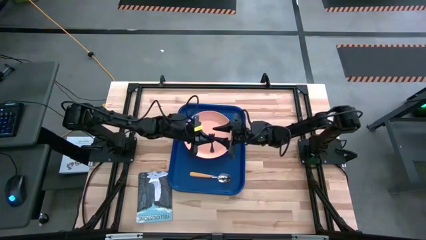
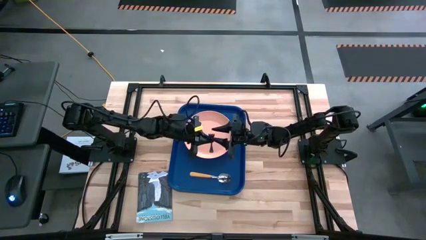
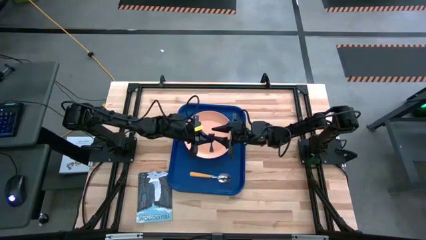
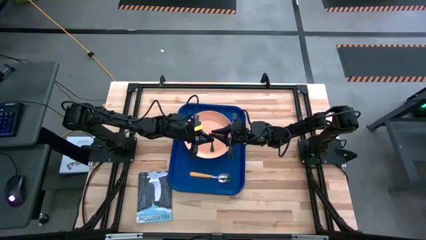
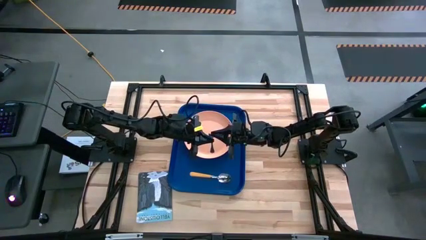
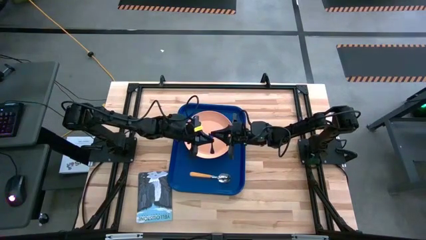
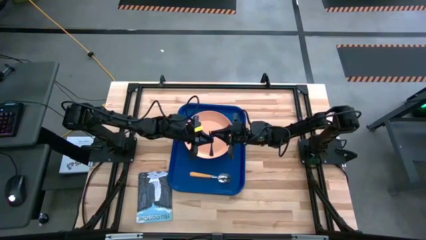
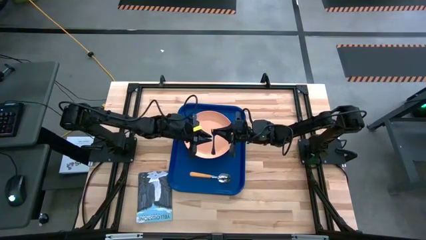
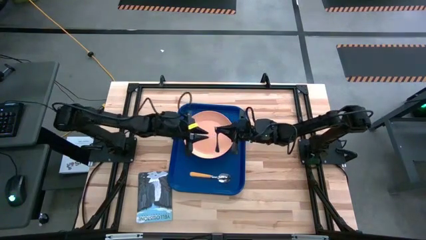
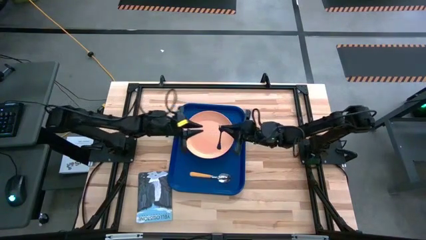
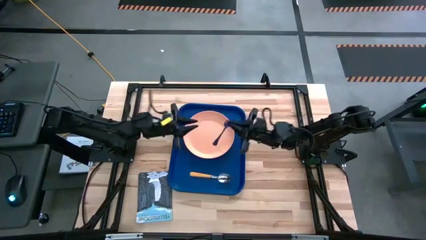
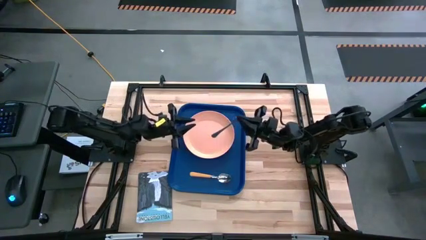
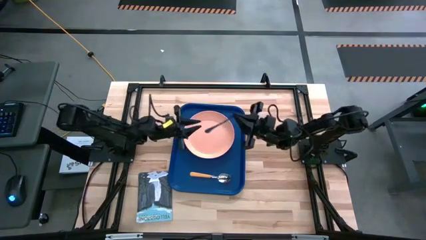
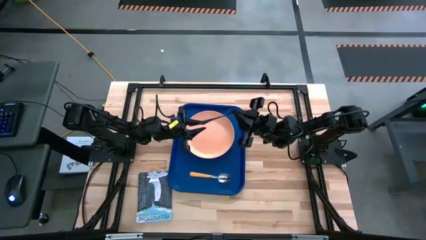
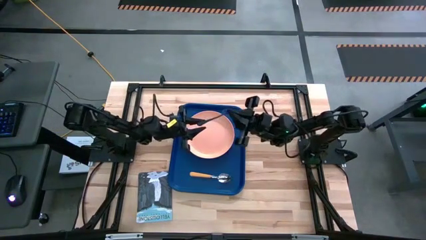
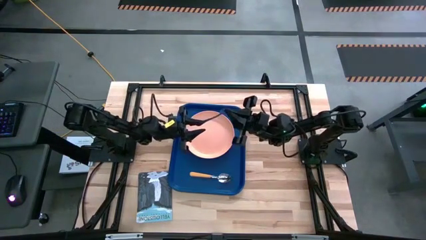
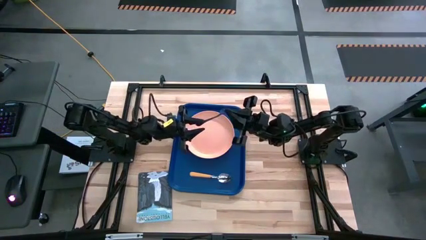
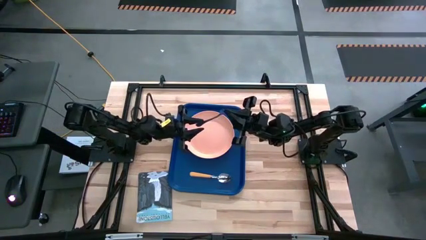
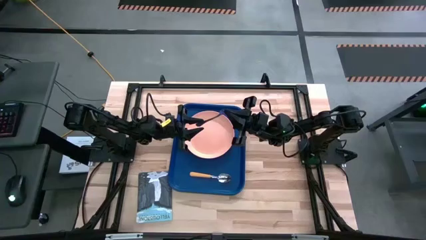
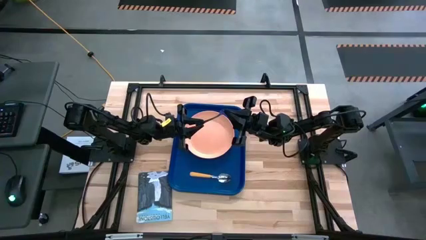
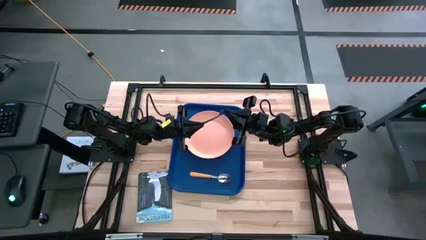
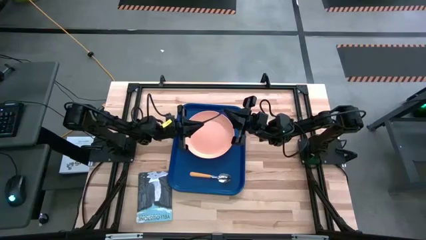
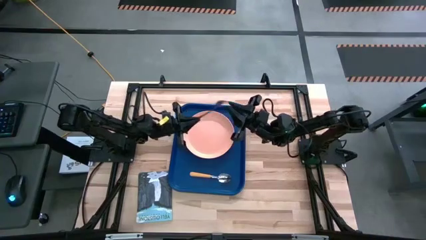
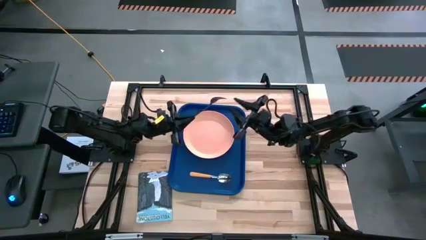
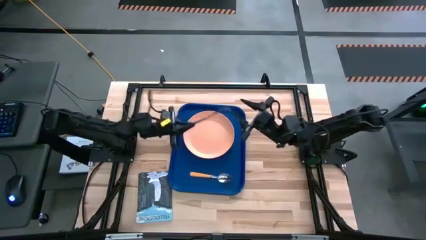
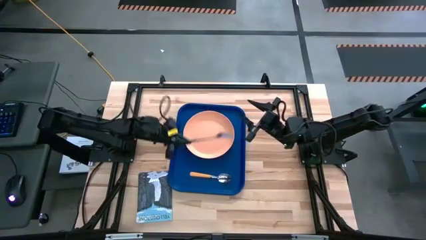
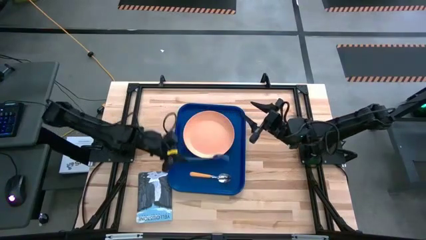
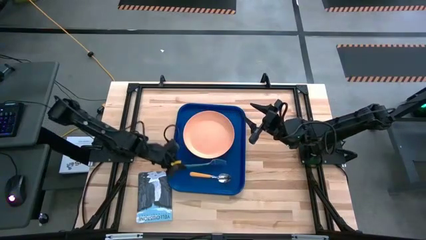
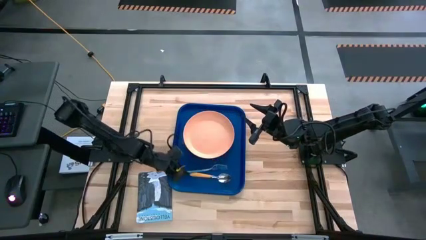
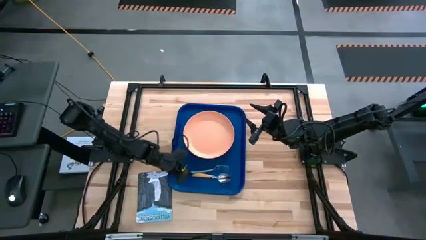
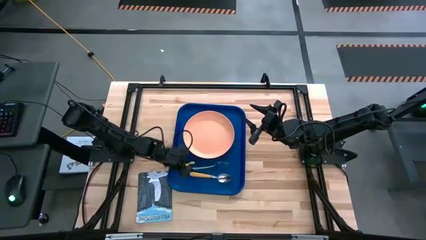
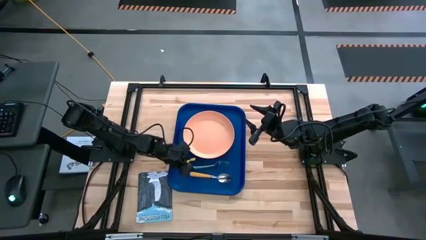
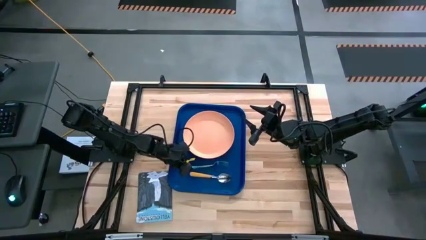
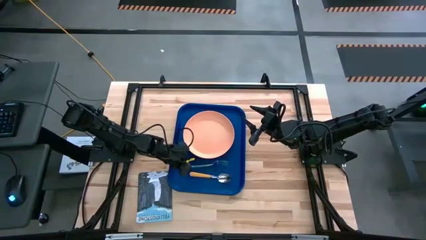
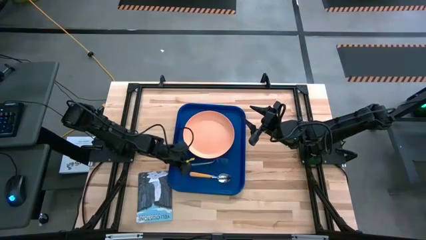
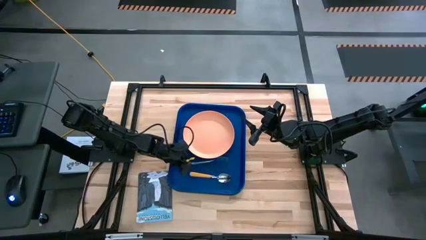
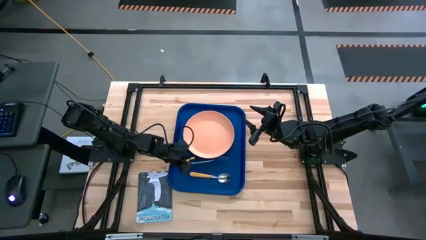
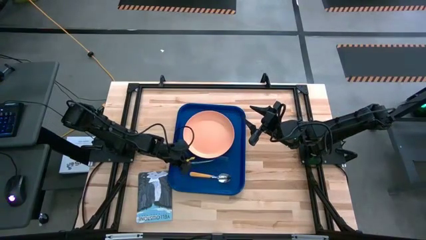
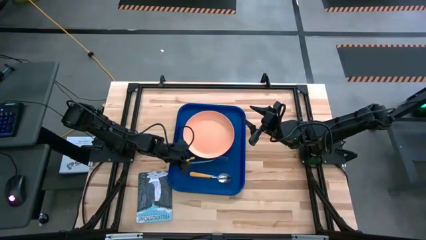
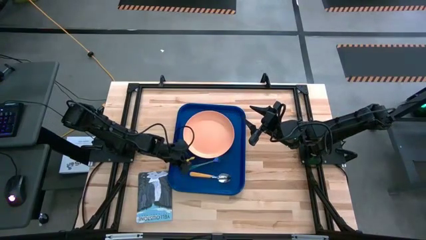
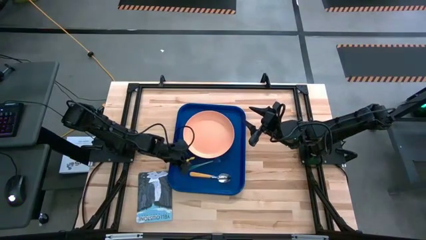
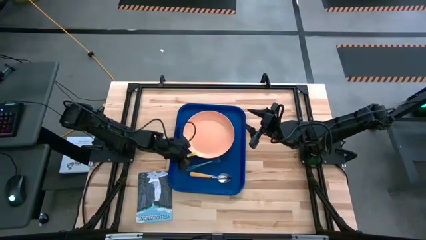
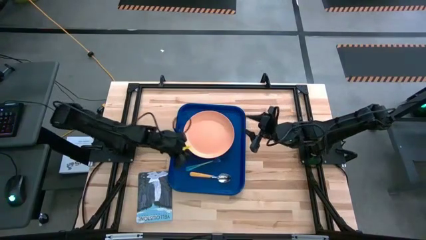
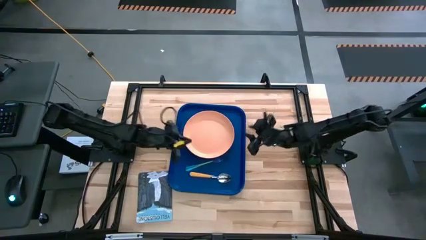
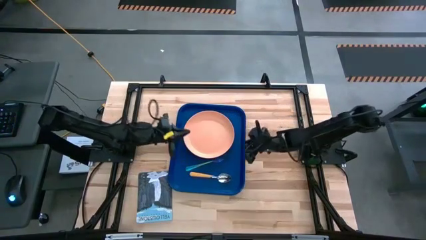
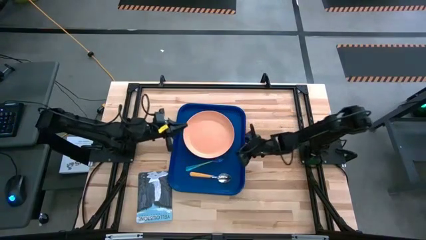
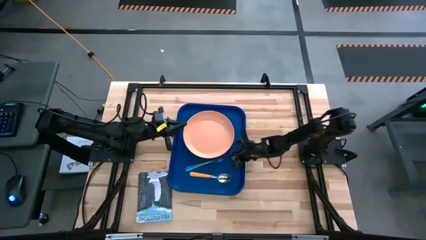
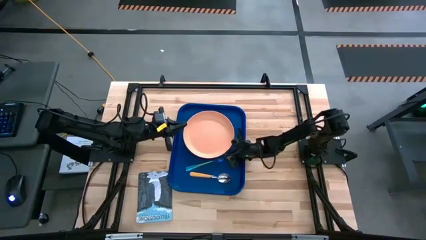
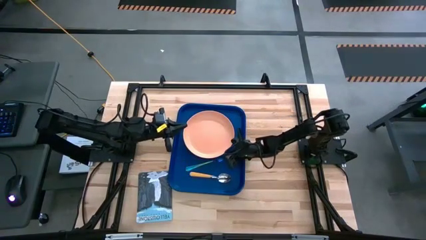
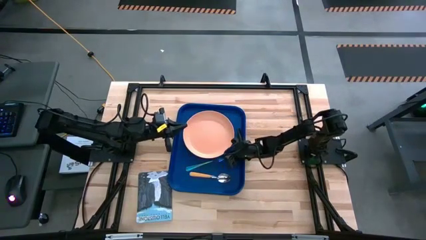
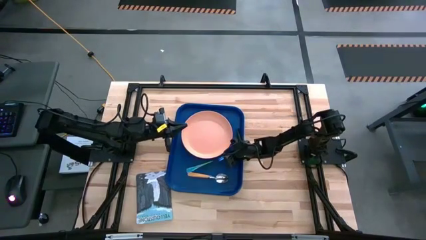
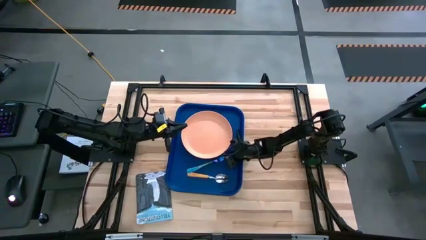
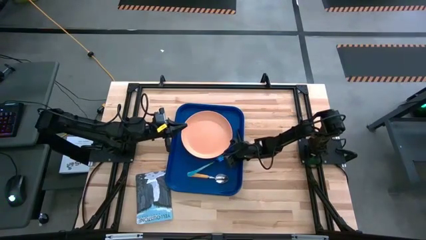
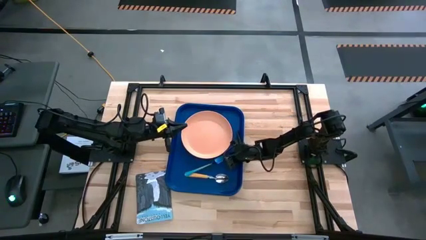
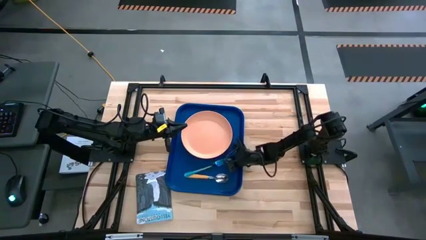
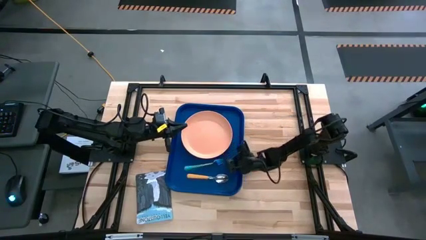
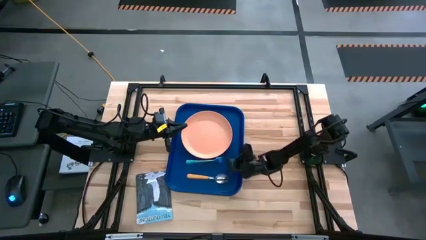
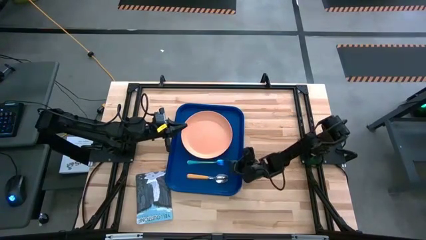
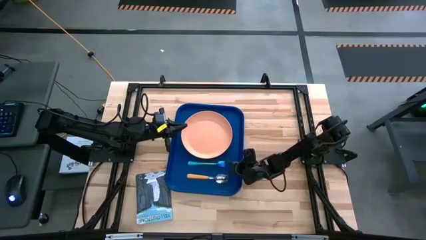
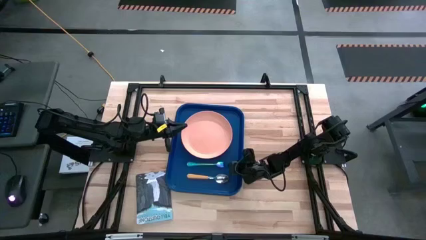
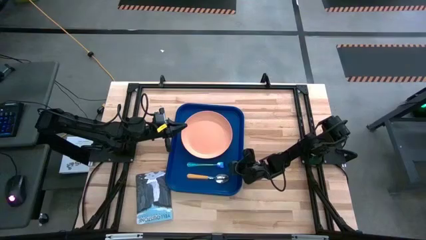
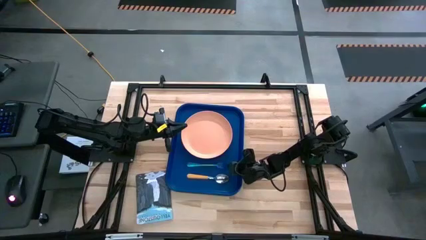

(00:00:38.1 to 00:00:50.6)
Task: Pick and place plate/cup/fork/spoon on tray
Put the purple fork on the blue serving tray
